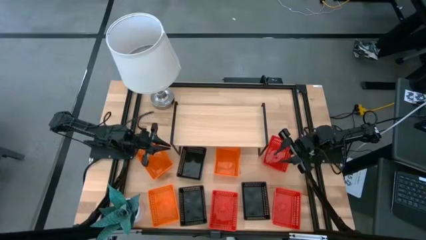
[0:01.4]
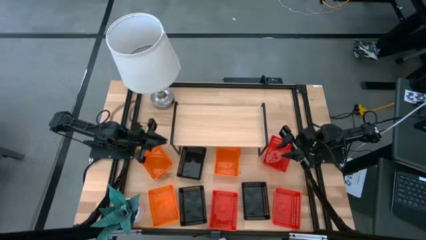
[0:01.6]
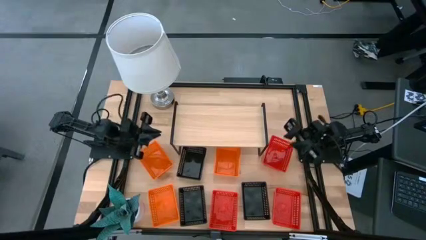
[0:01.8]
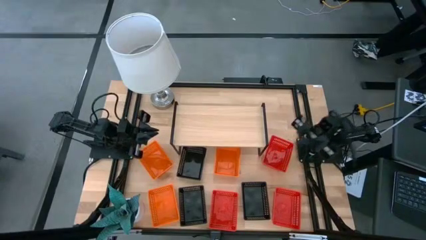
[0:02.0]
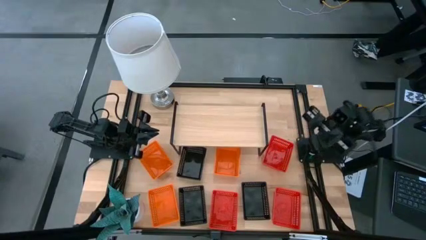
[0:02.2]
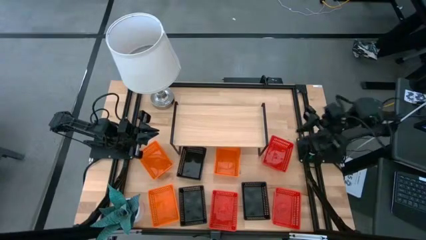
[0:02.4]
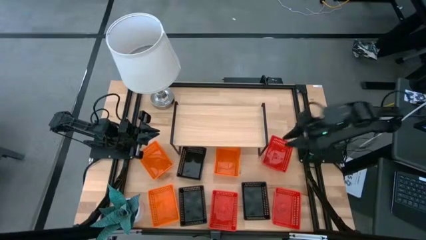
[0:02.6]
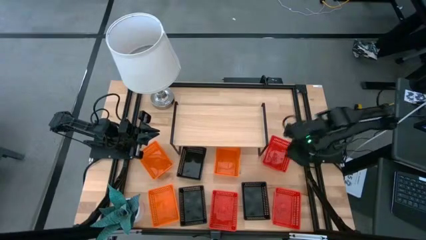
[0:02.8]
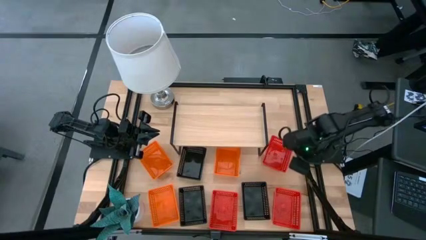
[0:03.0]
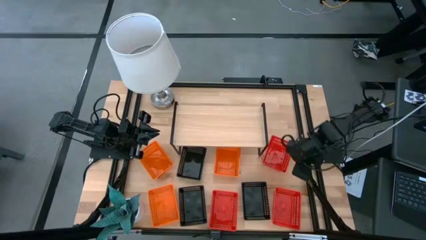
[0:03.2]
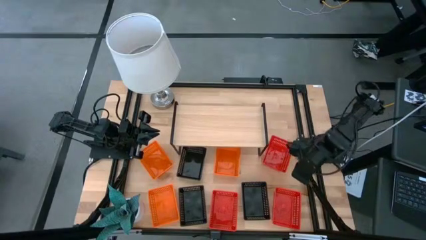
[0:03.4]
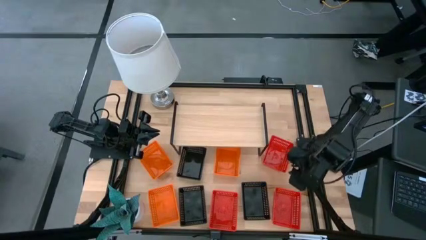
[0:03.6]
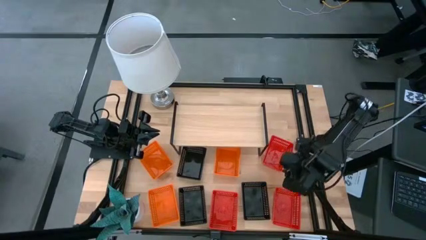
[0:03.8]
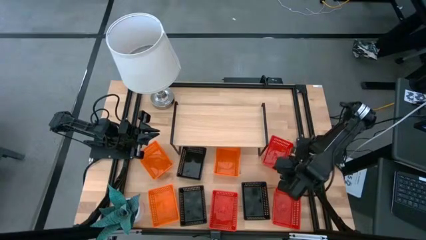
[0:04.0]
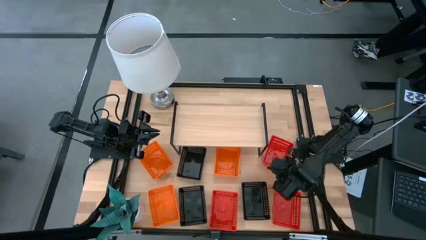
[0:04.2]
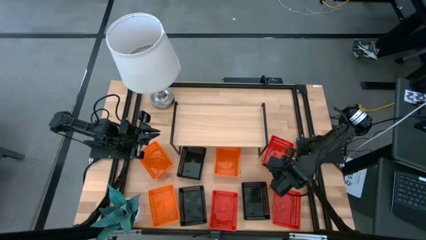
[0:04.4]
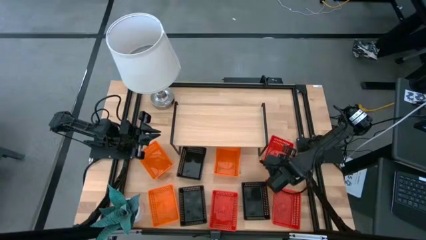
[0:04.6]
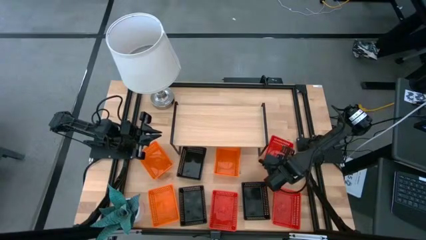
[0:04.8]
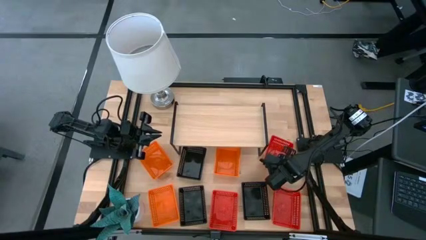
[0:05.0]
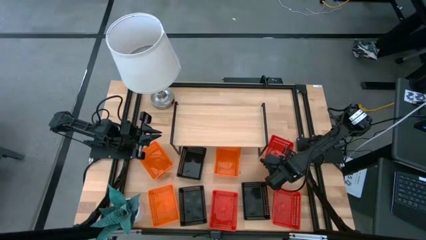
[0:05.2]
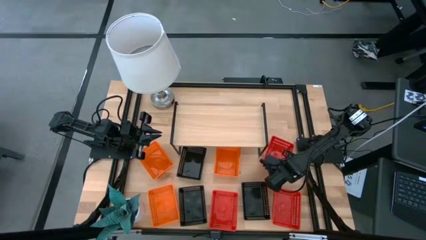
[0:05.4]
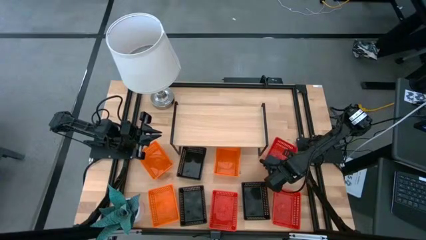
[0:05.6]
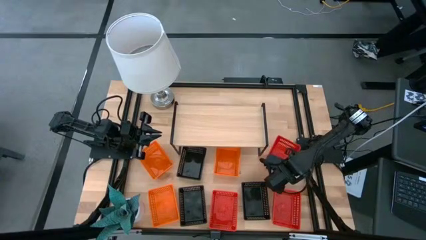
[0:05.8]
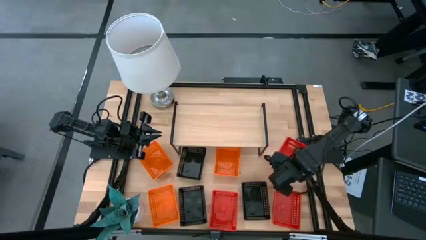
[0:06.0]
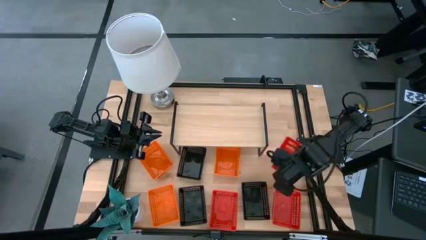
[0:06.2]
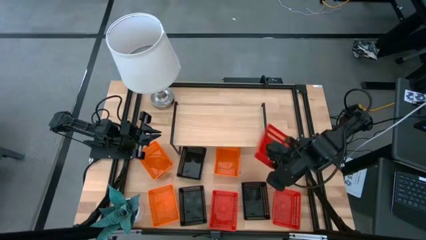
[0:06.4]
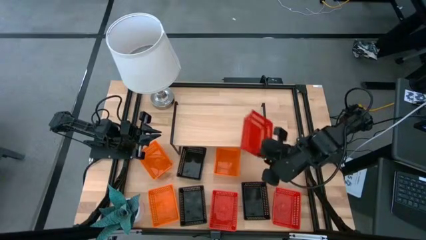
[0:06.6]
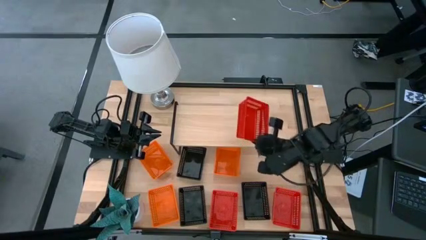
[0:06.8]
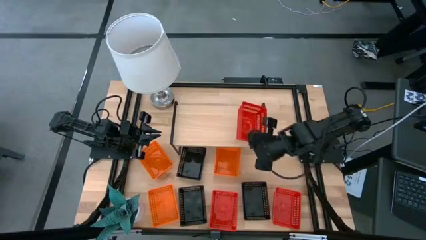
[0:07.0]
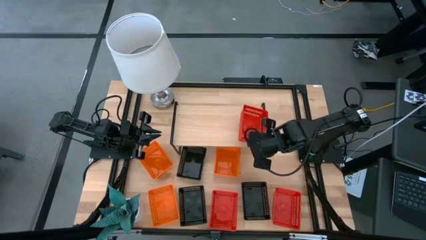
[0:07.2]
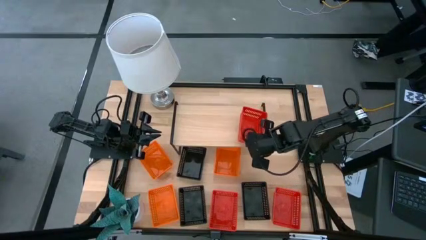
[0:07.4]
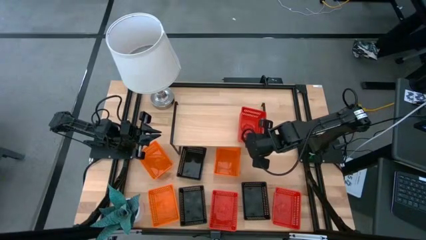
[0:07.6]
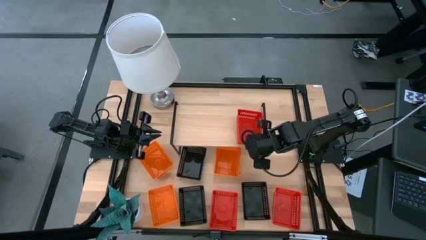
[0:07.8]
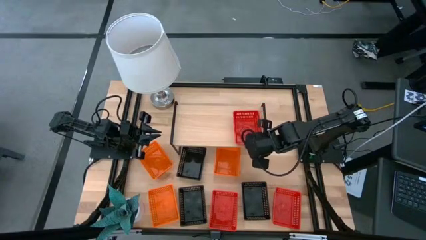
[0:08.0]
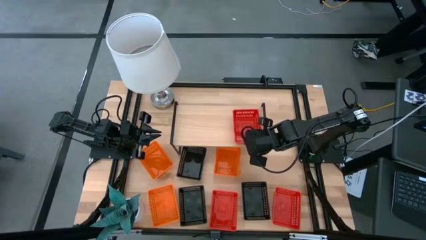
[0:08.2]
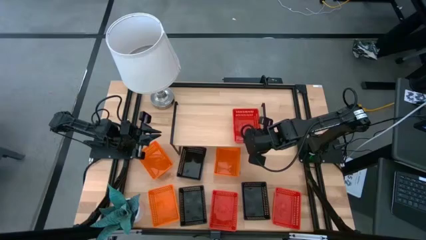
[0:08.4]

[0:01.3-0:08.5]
Task: Stack baskets on shelf by color
Put the top red bin on the shelf

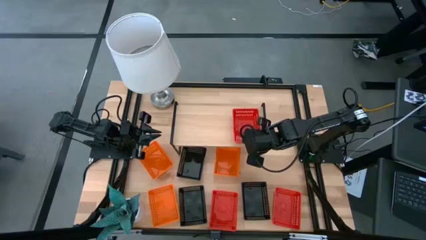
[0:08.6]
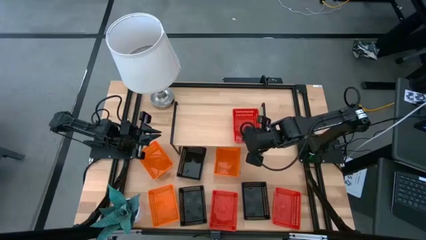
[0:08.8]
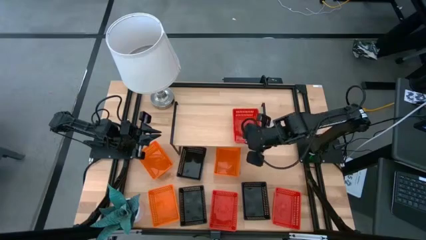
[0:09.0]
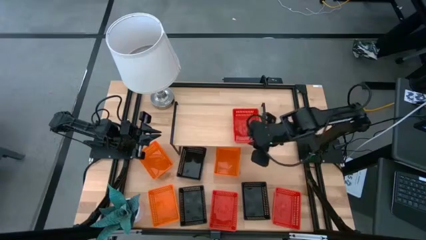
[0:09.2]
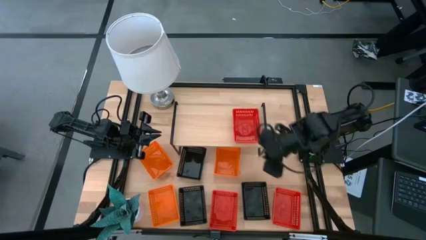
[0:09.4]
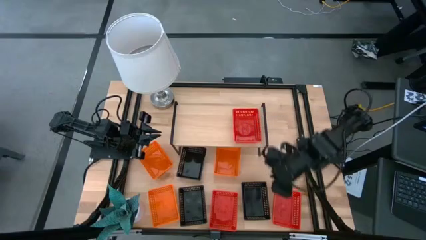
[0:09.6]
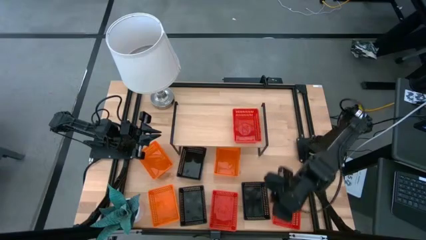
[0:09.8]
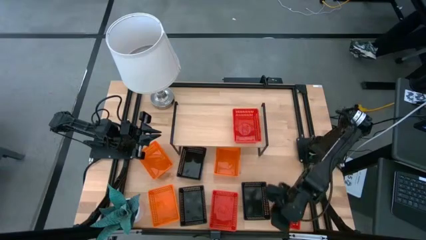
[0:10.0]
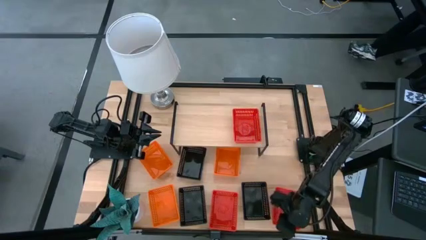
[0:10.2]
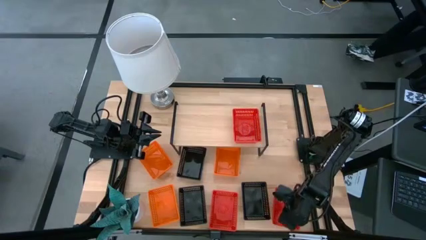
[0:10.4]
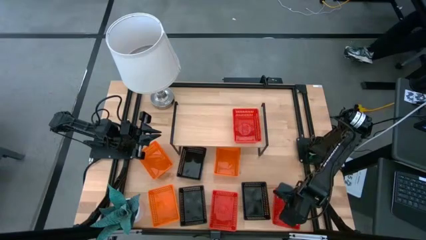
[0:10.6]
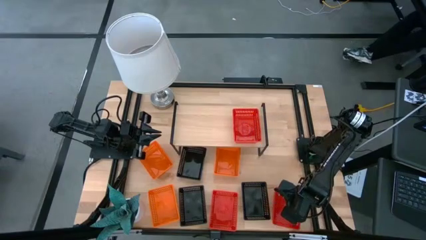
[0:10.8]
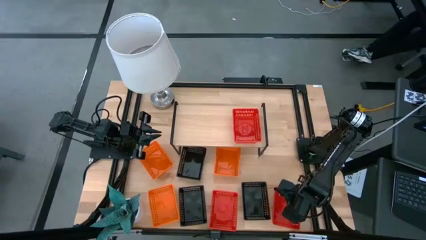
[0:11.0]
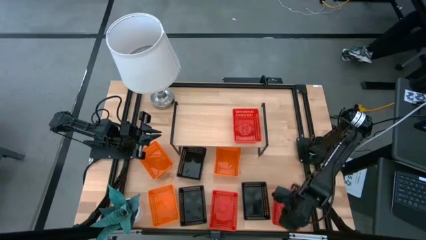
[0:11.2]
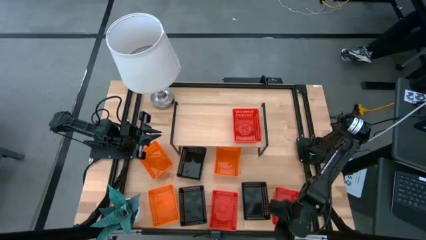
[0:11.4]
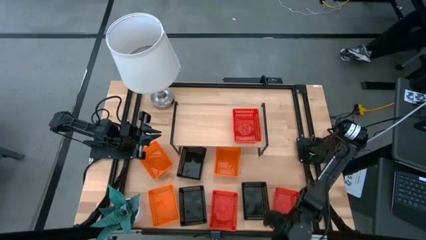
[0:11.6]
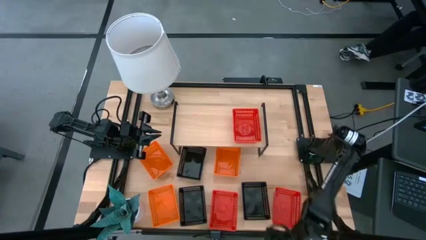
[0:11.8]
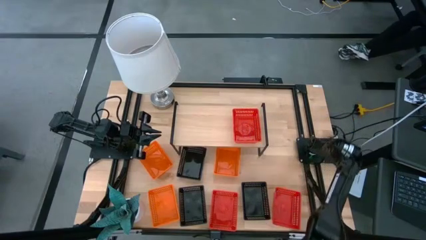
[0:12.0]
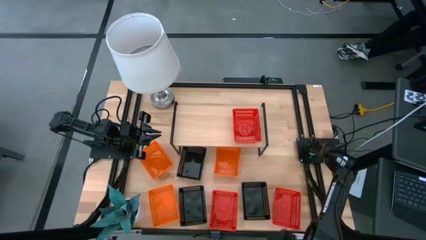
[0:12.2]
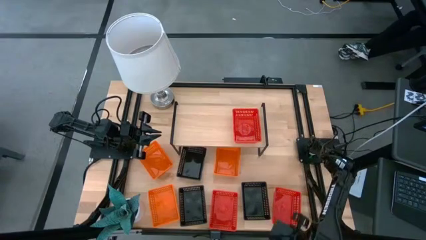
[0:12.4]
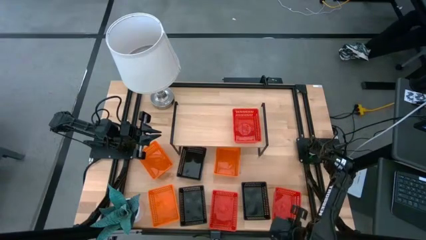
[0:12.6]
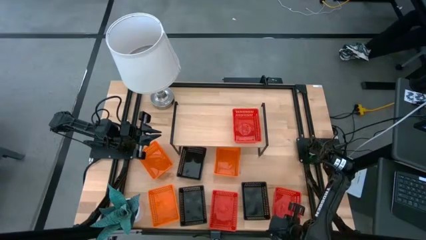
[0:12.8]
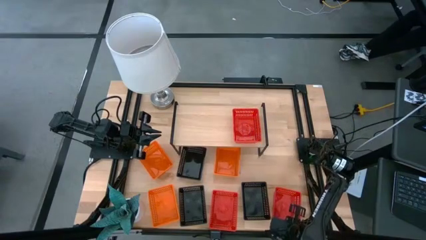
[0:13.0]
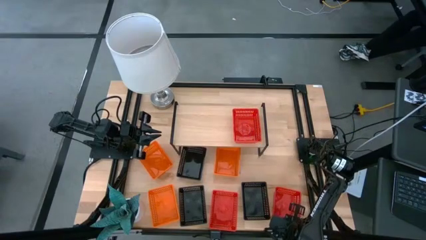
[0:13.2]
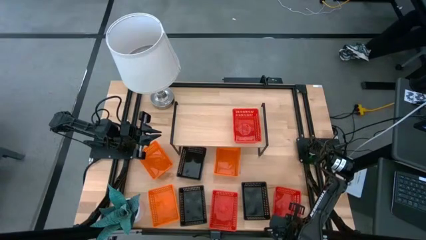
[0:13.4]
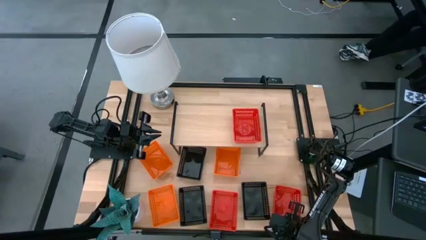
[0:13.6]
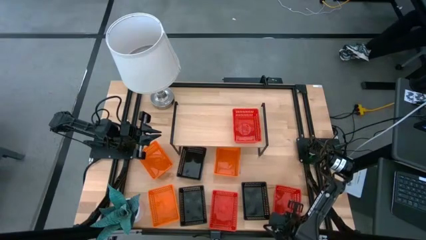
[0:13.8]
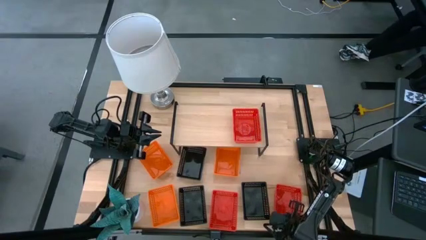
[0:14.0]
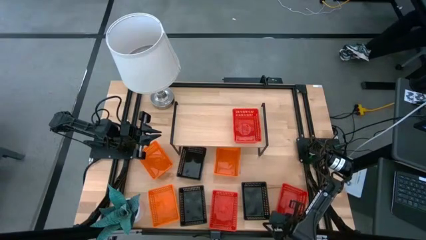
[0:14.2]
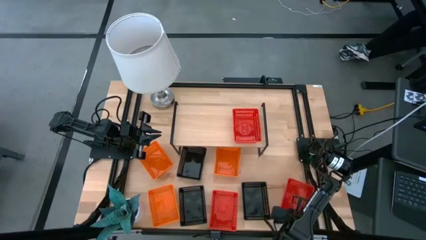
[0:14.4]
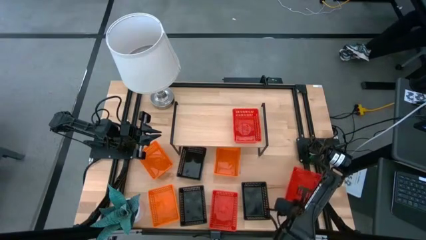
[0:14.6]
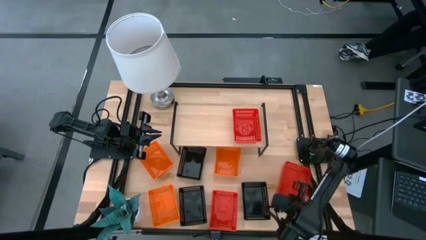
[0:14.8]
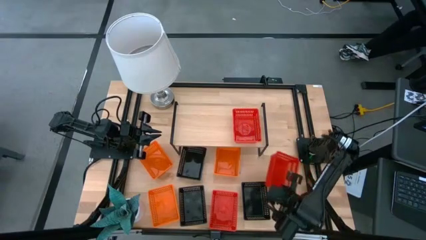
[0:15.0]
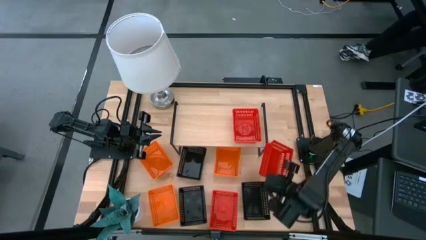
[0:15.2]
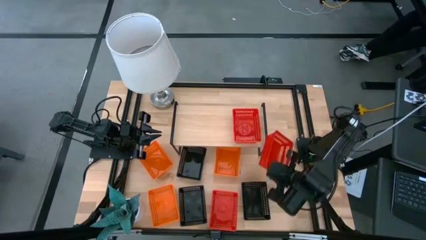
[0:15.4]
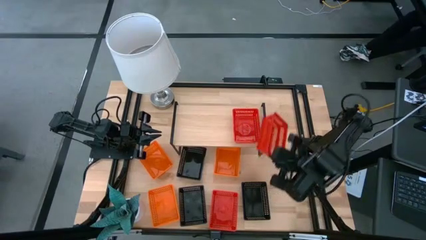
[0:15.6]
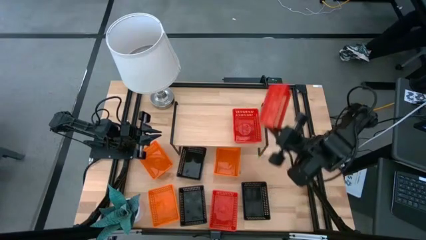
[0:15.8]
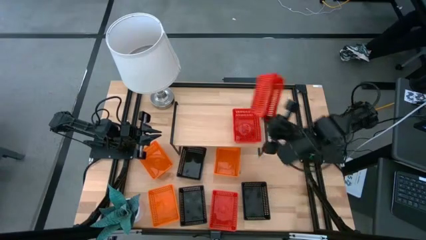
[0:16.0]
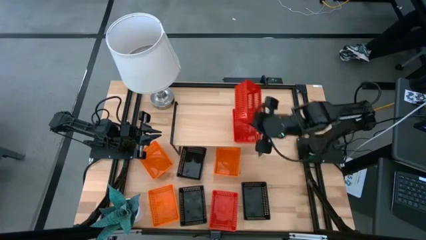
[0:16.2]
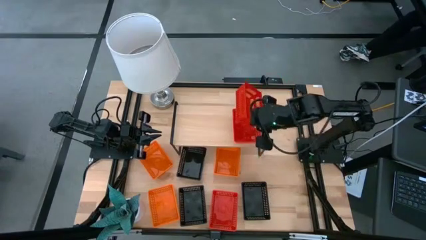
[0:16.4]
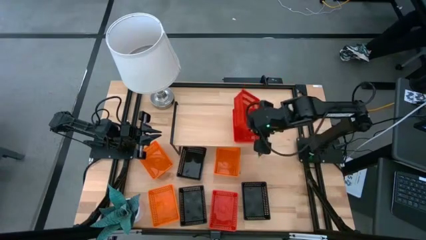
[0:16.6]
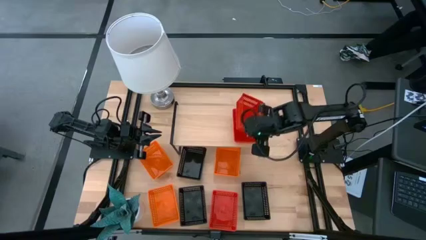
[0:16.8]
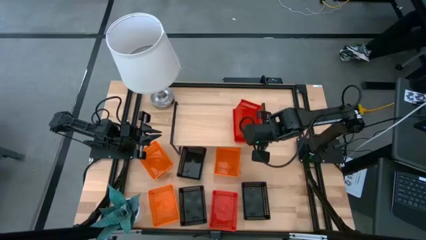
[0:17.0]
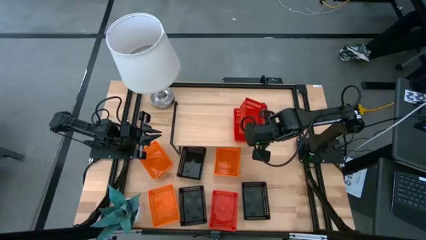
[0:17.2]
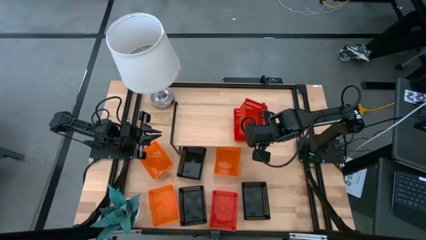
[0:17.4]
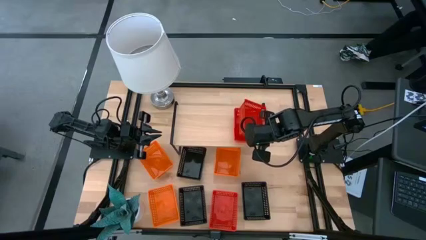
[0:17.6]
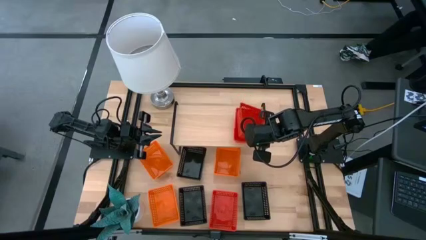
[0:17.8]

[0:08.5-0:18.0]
Stack the left red bin on top of the red bin on the shelf
